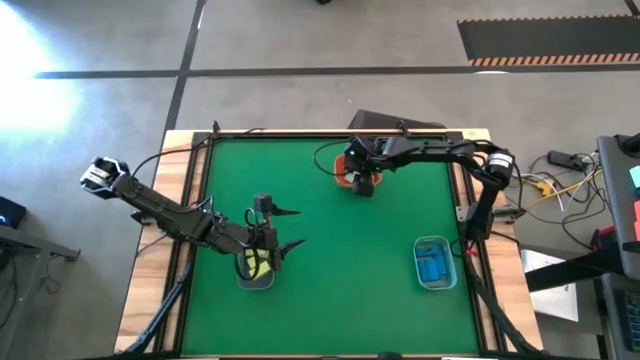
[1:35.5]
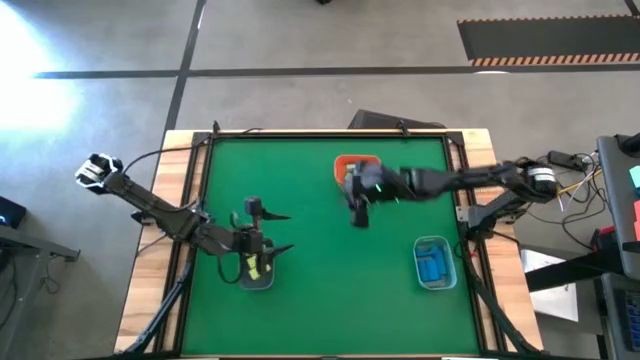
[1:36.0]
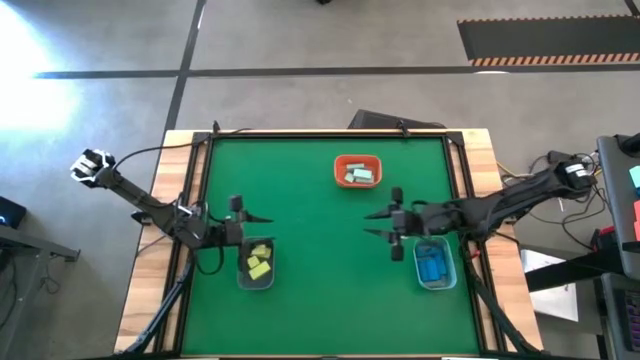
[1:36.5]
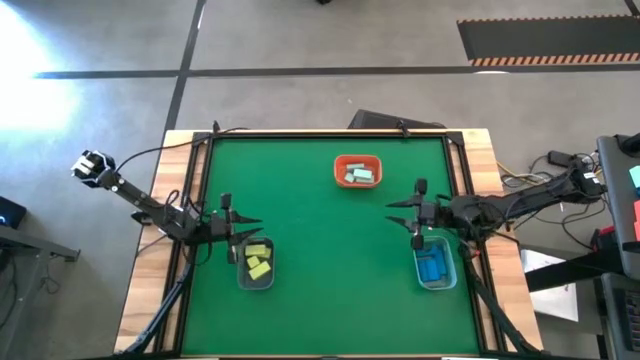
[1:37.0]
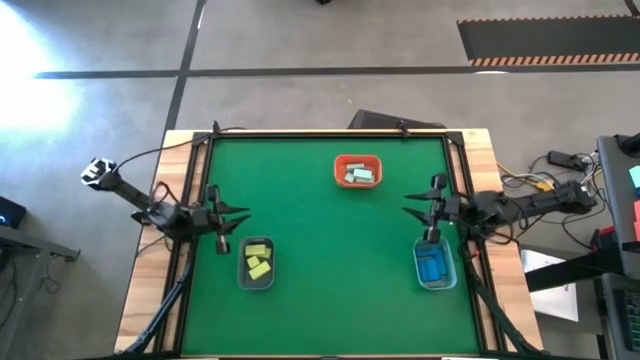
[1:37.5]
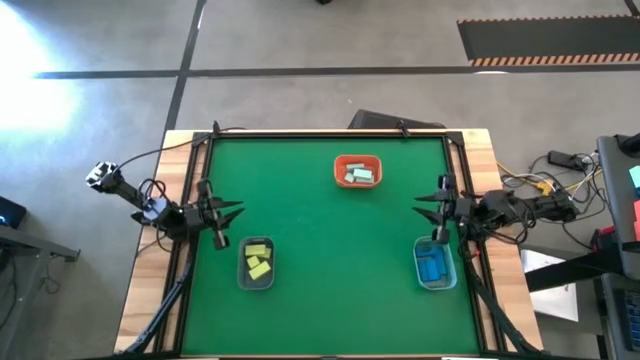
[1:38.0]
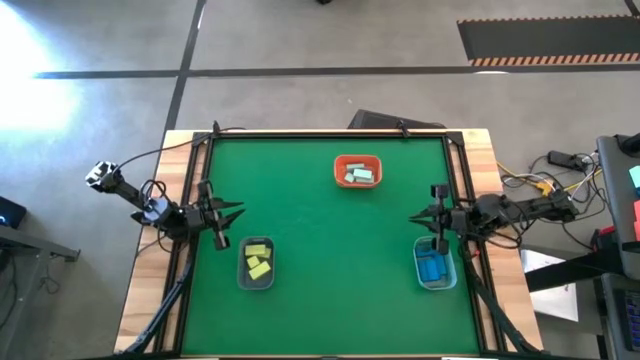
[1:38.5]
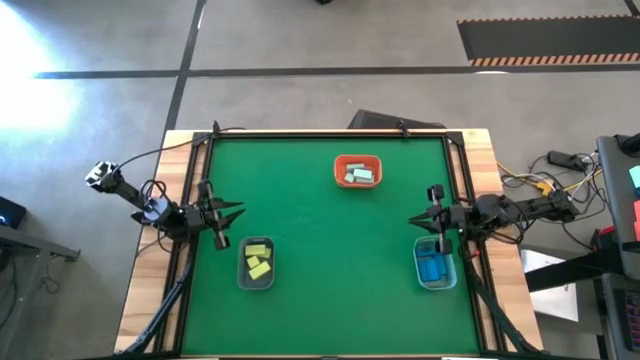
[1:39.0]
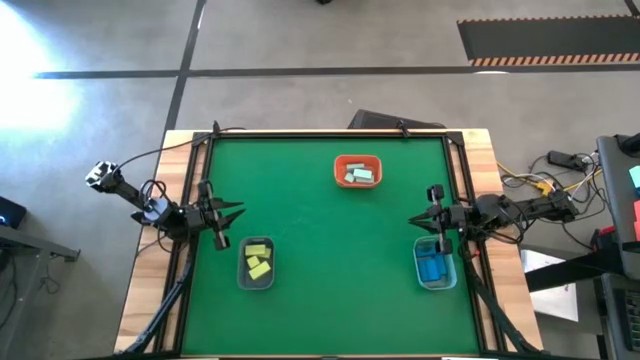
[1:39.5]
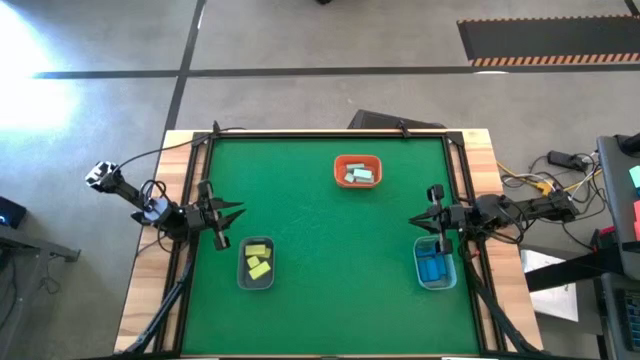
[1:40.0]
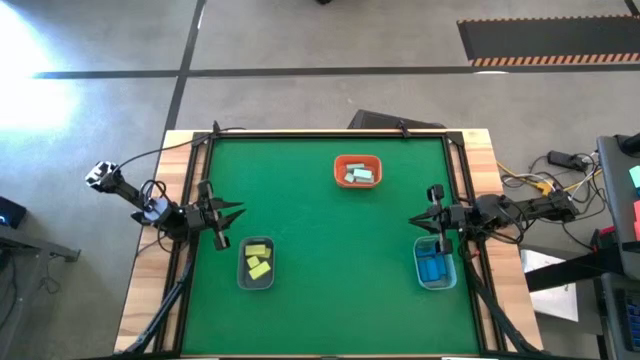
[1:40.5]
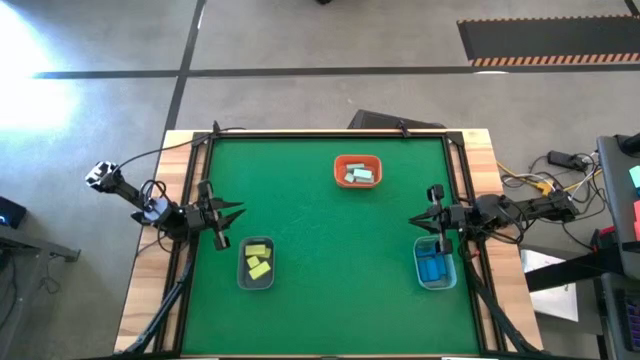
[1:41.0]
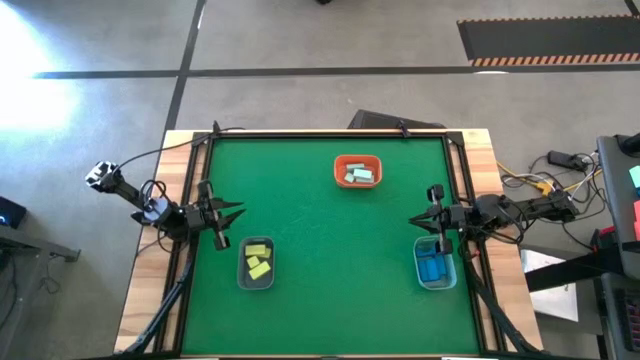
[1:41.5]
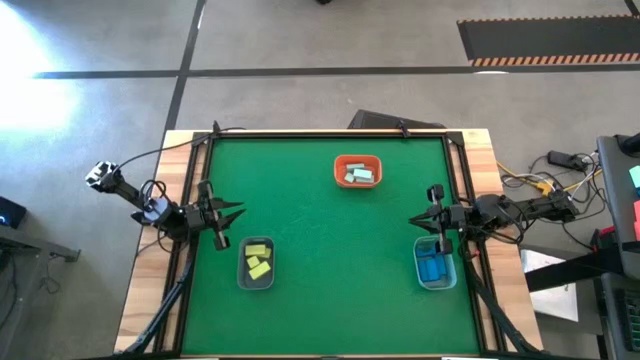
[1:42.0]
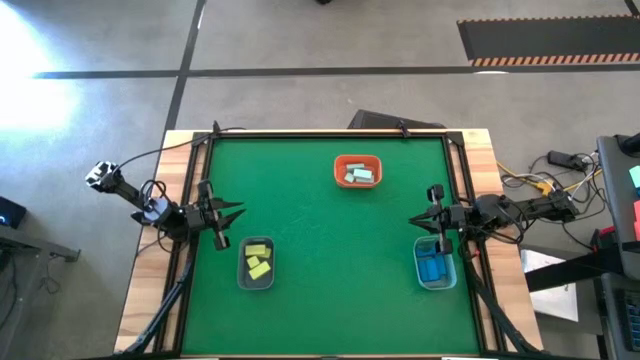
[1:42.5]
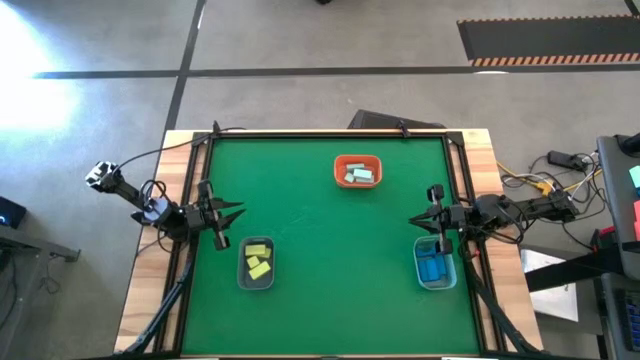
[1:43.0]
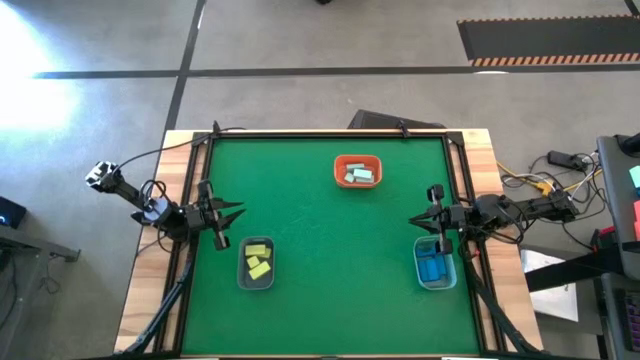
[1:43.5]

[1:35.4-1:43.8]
Task: Sort & place blocks by color
Return to Home Position

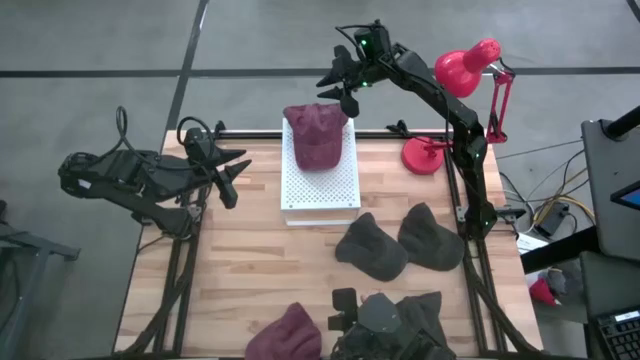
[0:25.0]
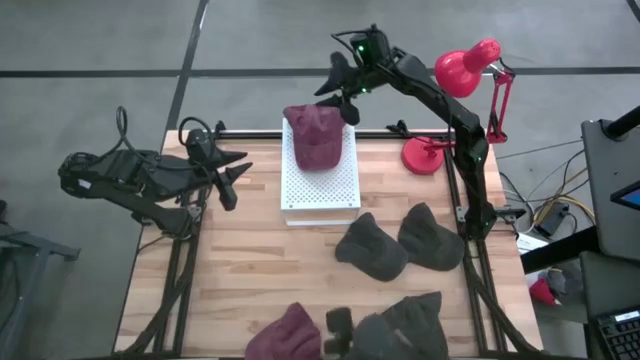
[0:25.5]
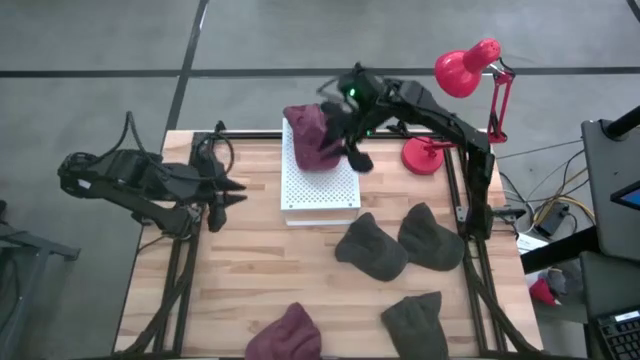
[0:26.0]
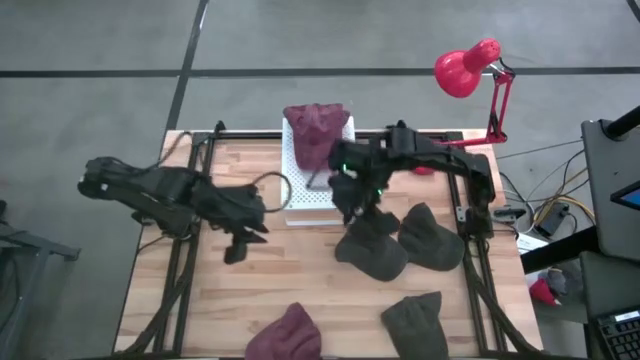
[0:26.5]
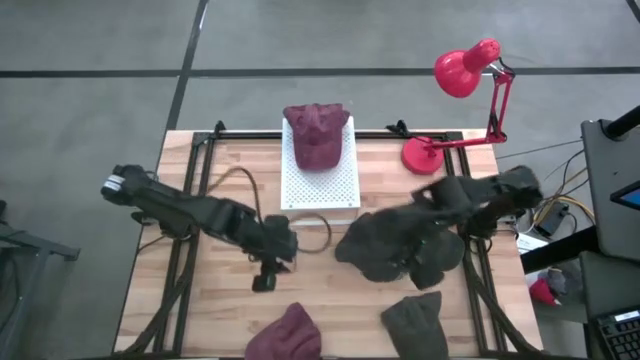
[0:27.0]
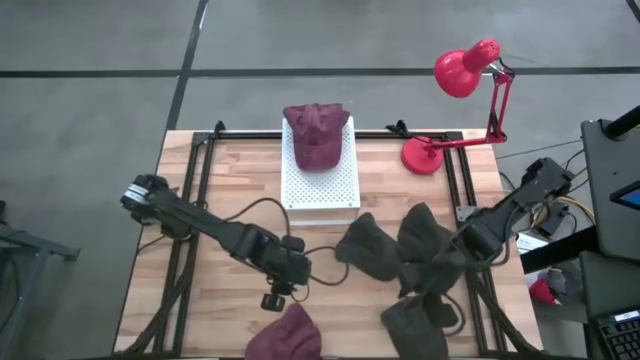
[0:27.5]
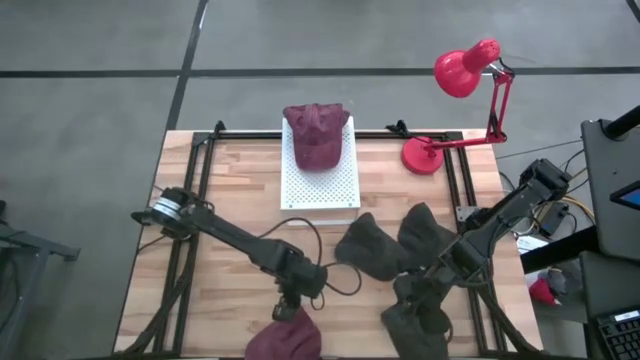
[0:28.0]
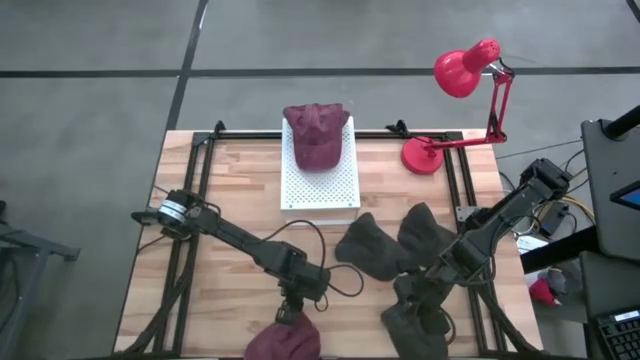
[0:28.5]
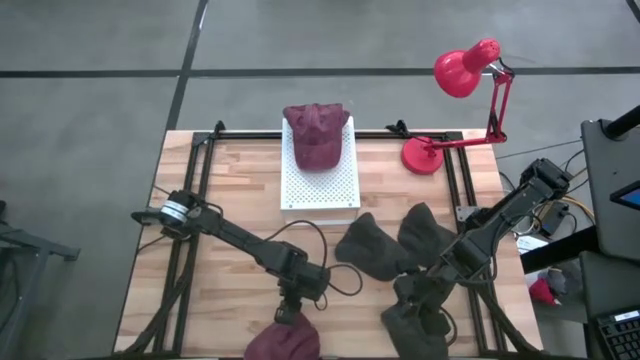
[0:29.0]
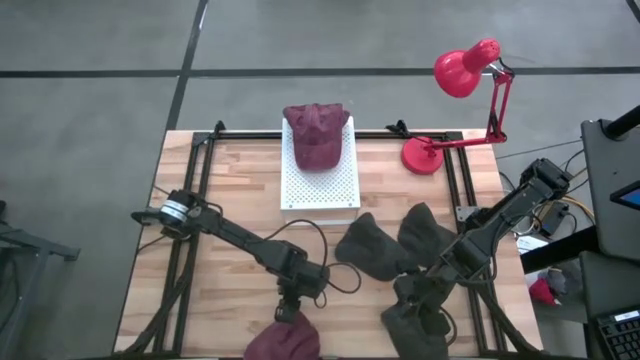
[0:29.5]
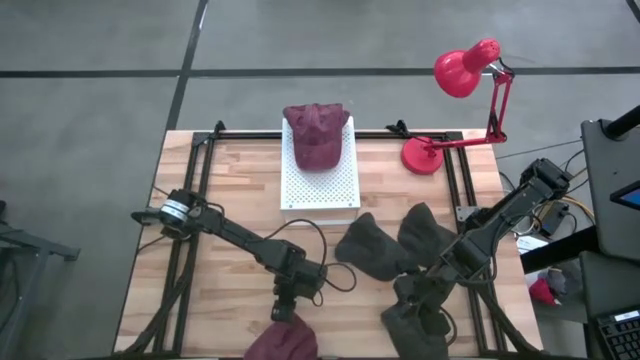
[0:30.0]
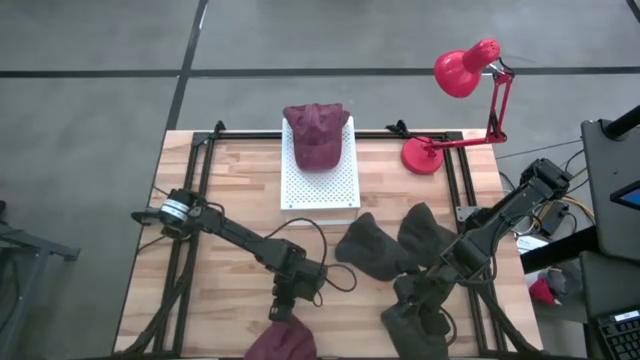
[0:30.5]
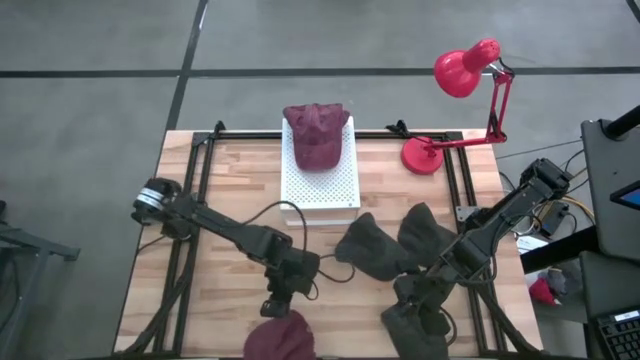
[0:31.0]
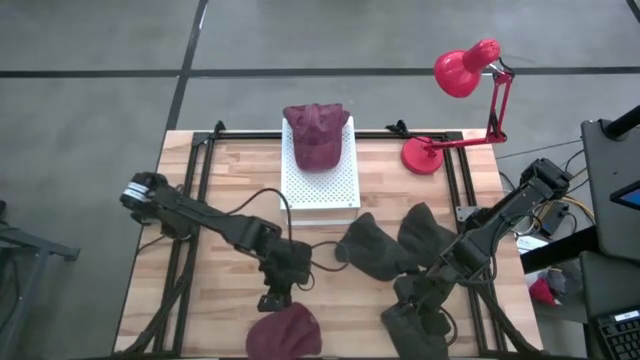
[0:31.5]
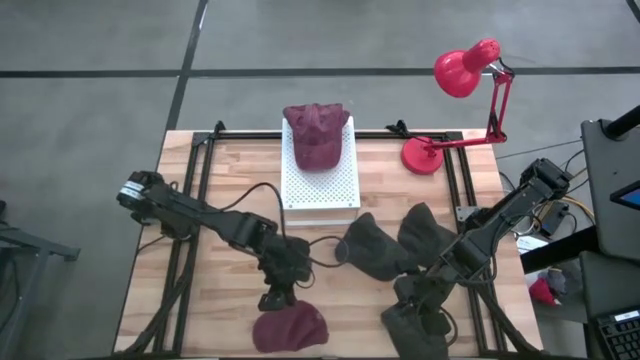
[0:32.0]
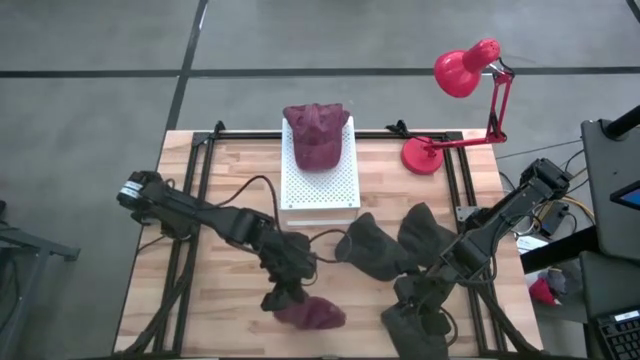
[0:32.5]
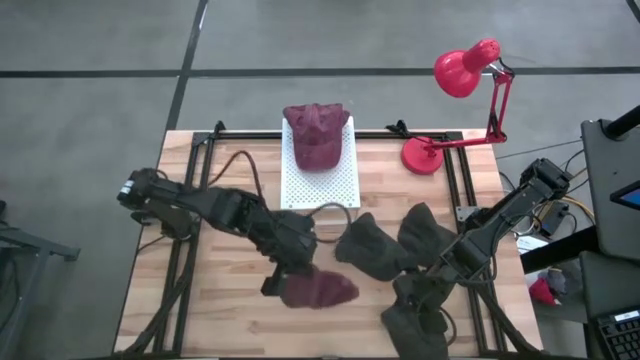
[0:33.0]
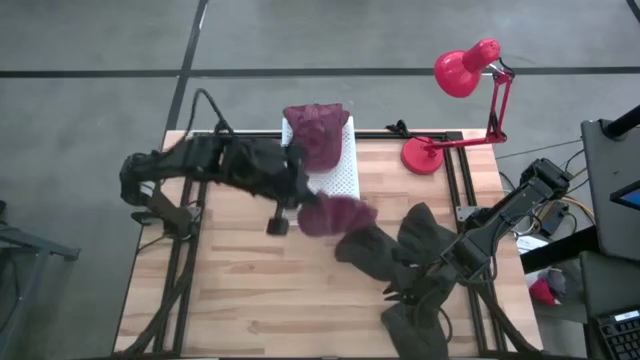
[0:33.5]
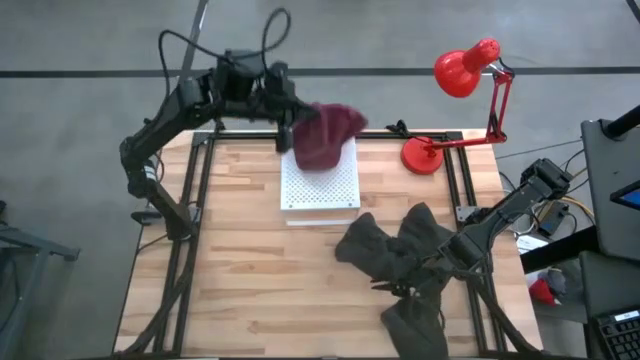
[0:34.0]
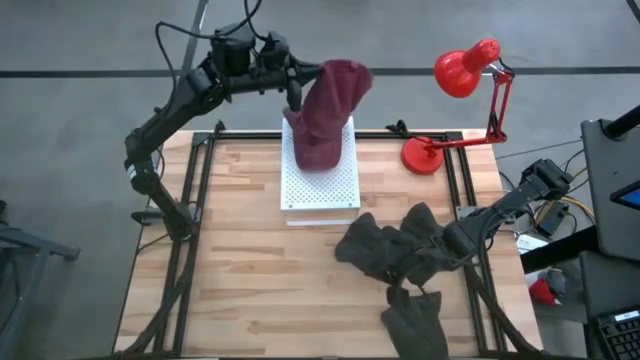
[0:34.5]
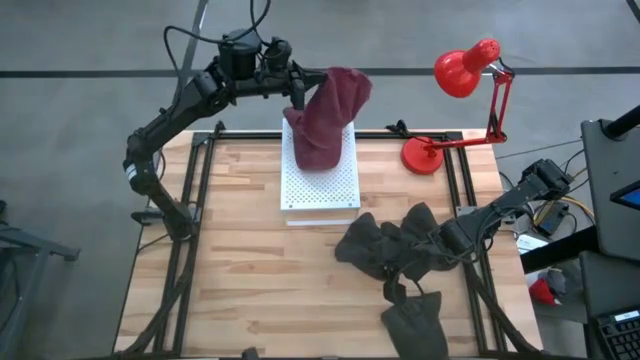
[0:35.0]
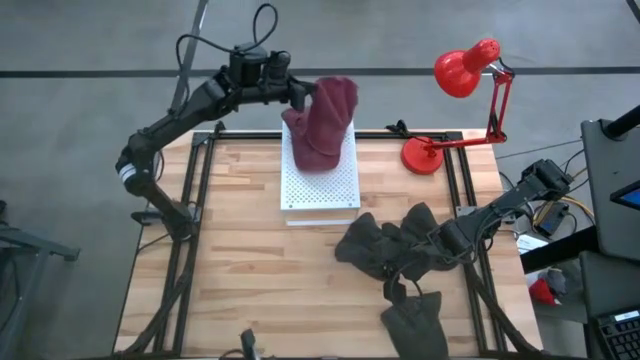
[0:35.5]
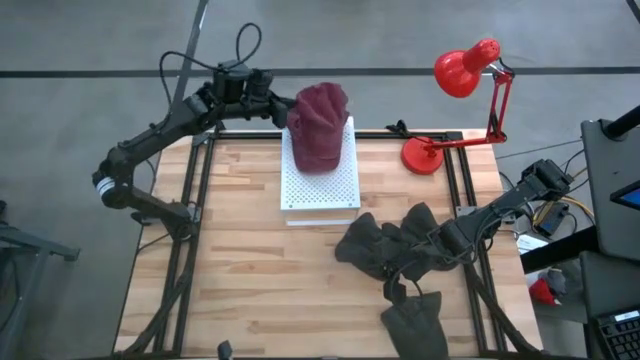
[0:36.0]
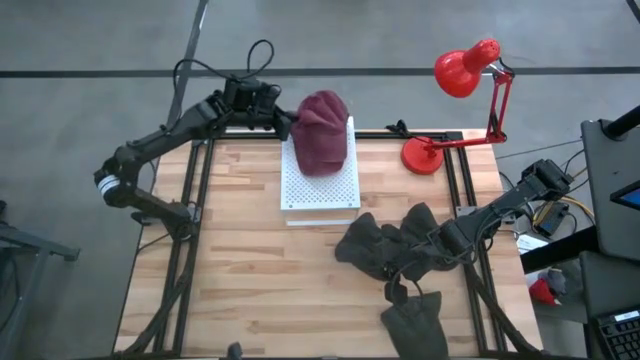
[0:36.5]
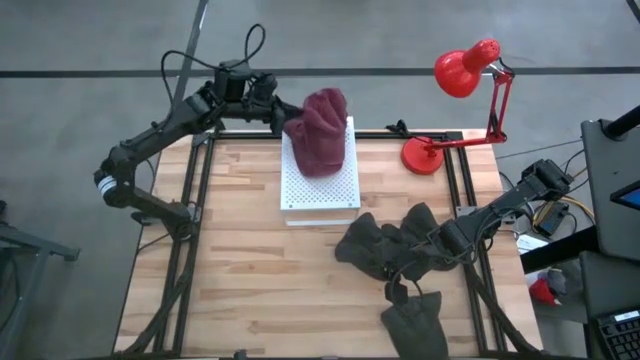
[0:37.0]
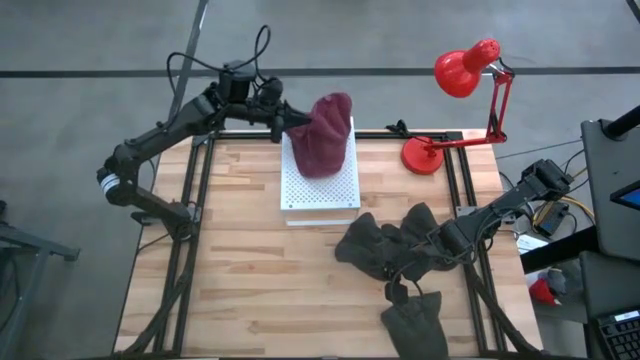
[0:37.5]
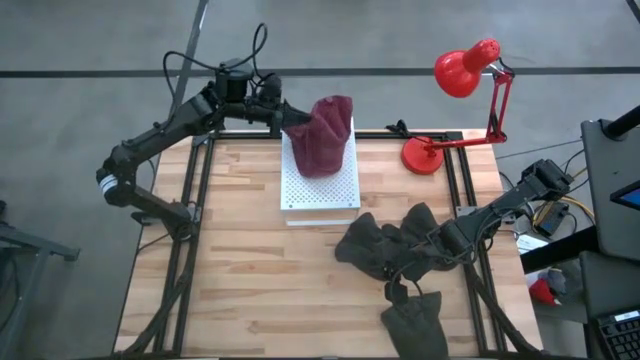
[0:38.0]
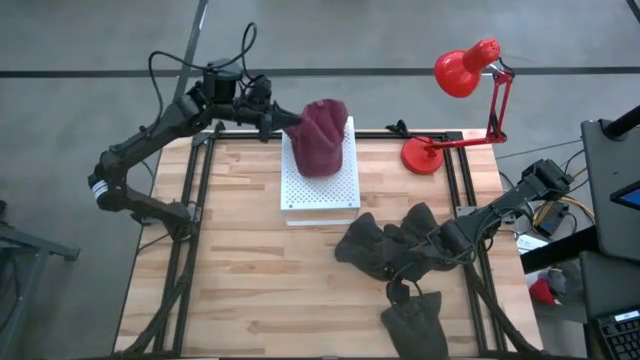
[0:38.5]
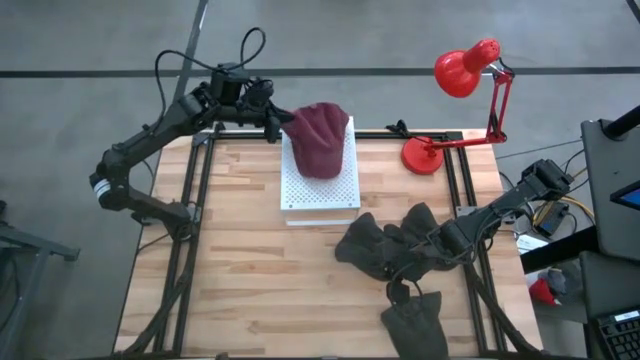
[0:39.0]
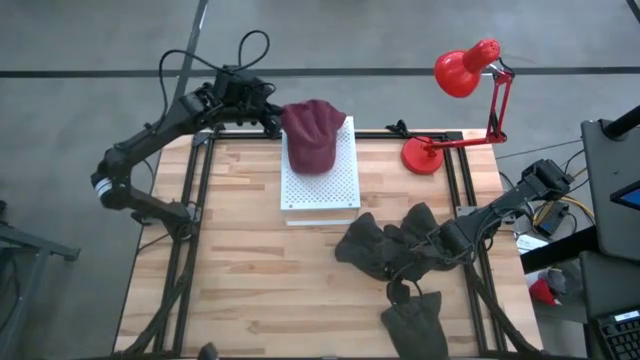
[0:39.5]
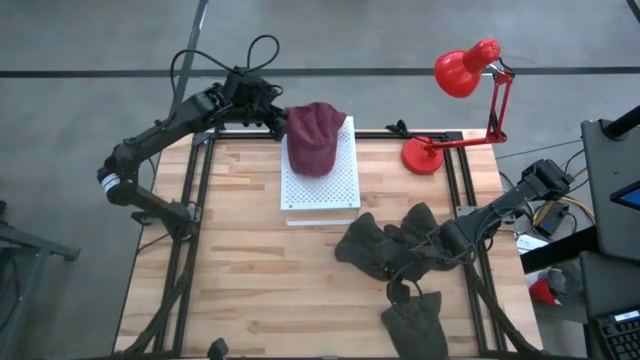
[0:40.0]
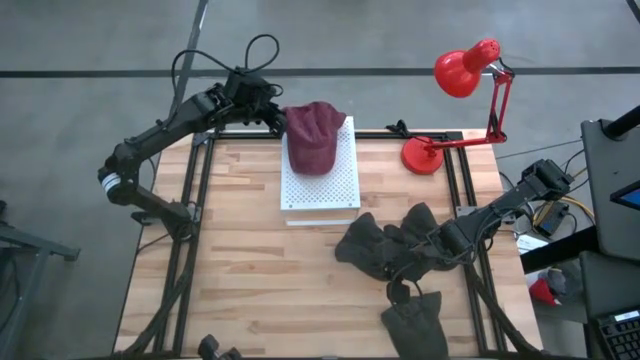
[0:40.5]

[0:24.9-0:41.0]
Task: Pick & Place hat
Stack the red cap on the red caps on the shelf
